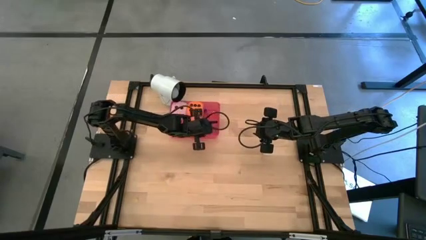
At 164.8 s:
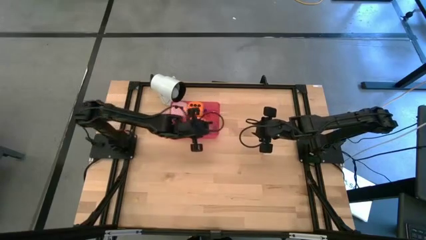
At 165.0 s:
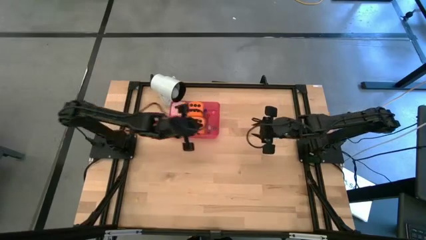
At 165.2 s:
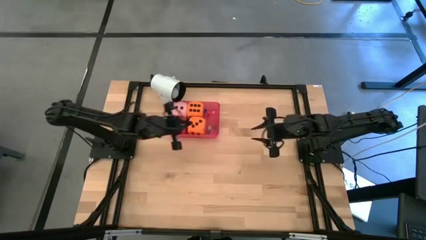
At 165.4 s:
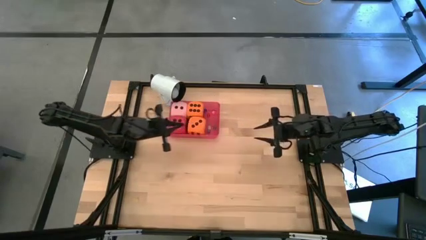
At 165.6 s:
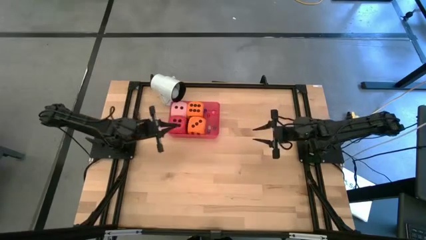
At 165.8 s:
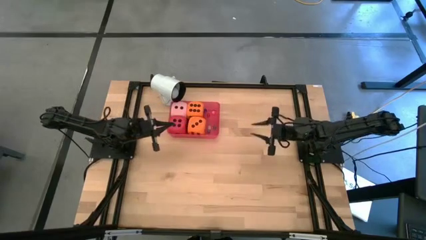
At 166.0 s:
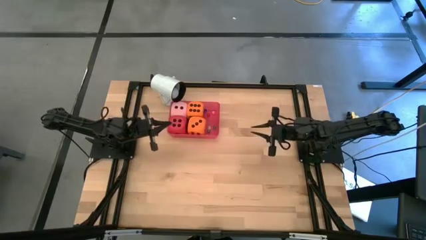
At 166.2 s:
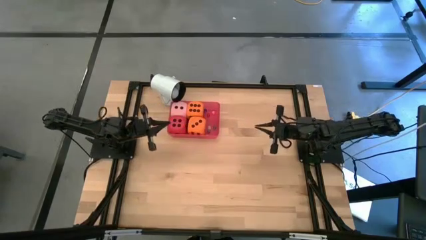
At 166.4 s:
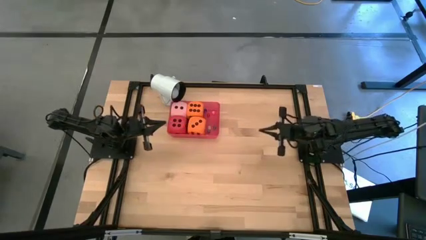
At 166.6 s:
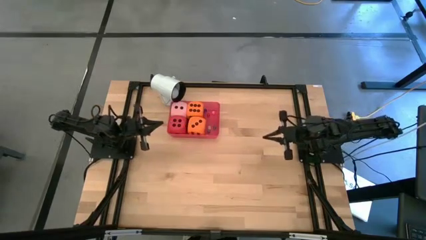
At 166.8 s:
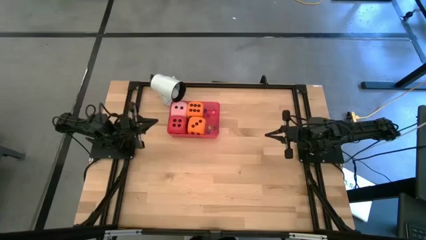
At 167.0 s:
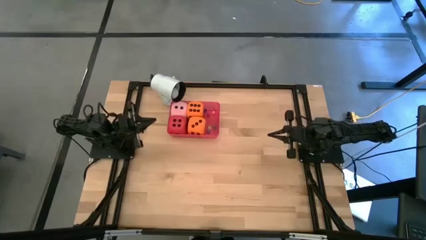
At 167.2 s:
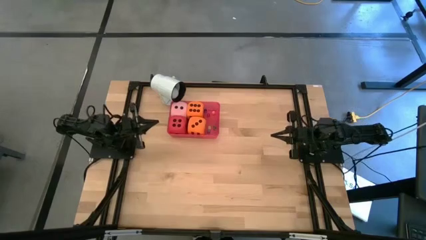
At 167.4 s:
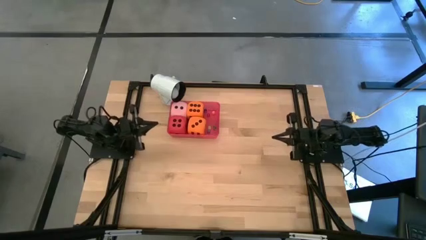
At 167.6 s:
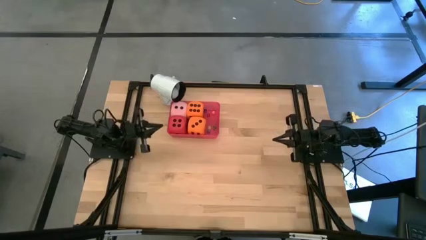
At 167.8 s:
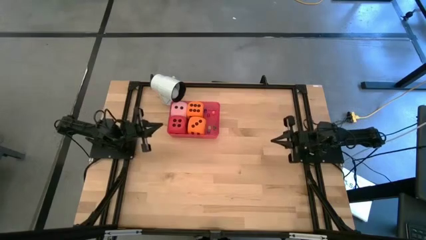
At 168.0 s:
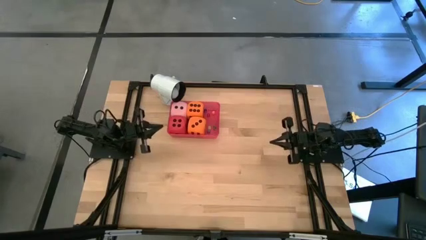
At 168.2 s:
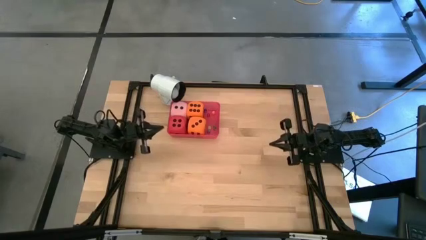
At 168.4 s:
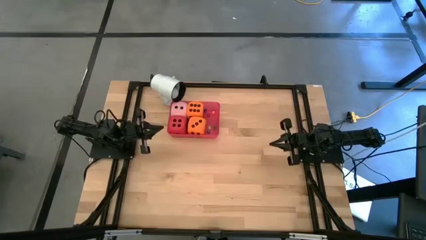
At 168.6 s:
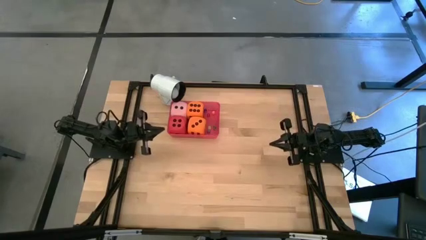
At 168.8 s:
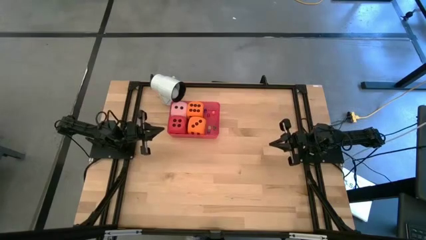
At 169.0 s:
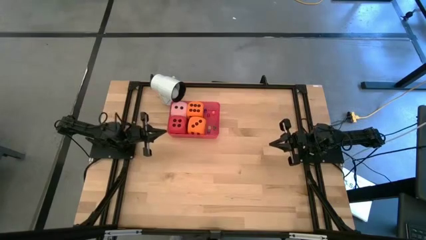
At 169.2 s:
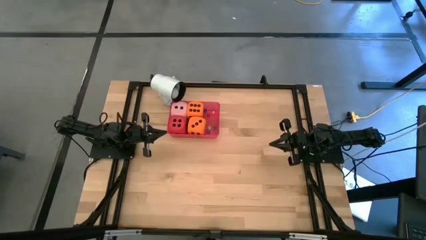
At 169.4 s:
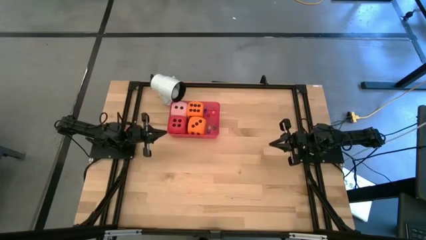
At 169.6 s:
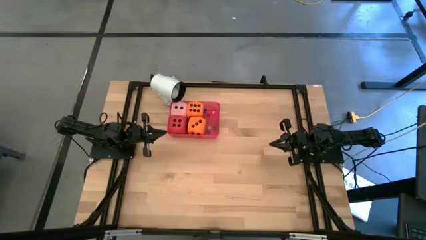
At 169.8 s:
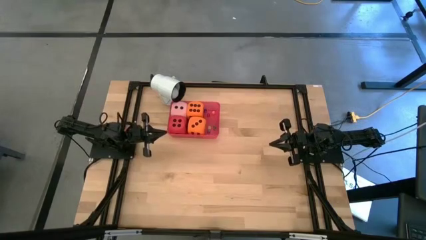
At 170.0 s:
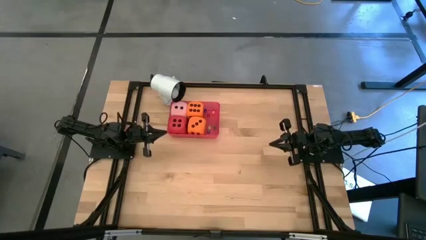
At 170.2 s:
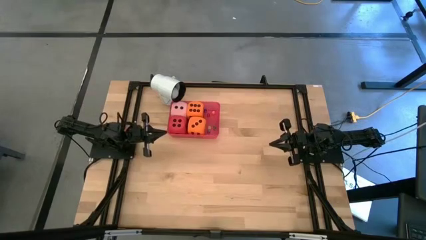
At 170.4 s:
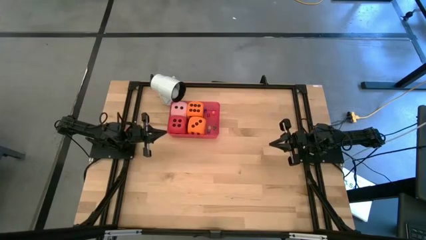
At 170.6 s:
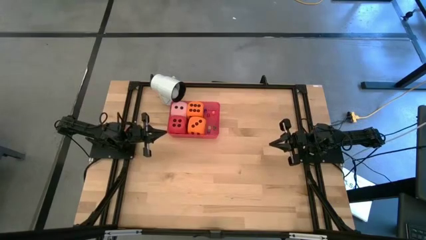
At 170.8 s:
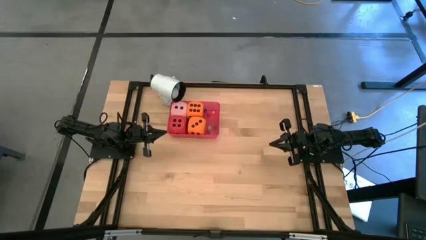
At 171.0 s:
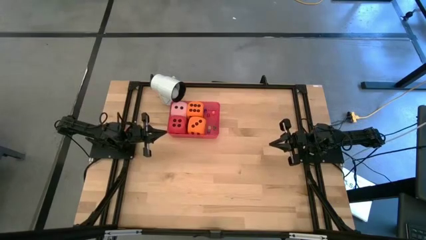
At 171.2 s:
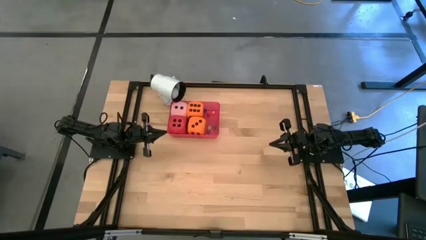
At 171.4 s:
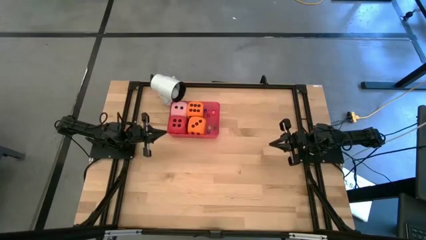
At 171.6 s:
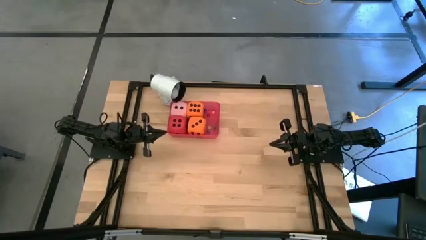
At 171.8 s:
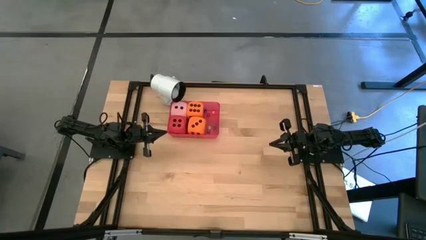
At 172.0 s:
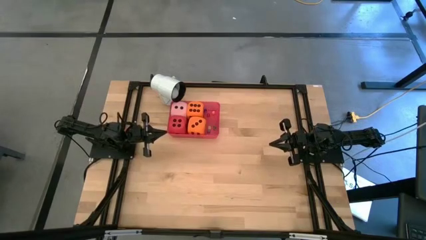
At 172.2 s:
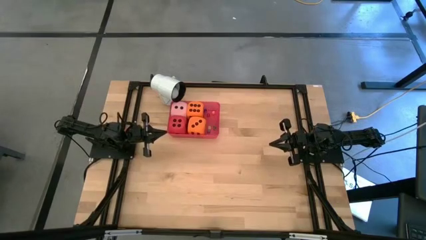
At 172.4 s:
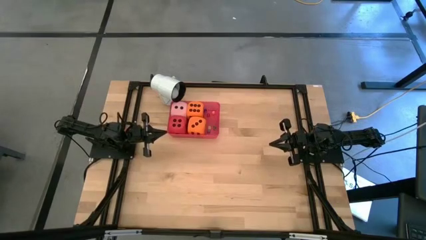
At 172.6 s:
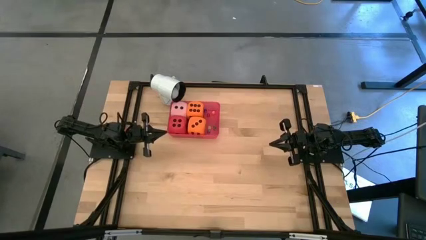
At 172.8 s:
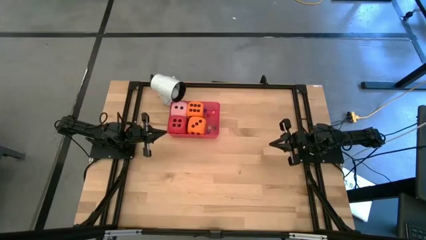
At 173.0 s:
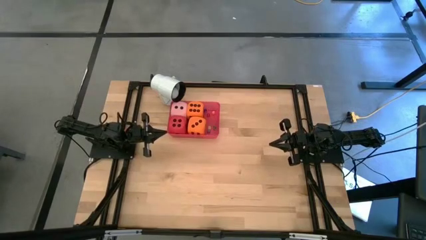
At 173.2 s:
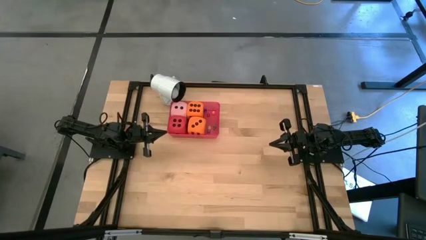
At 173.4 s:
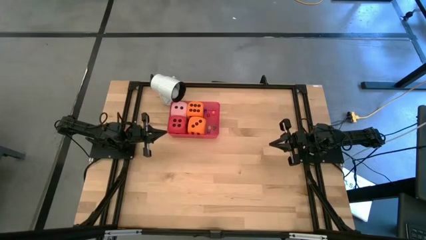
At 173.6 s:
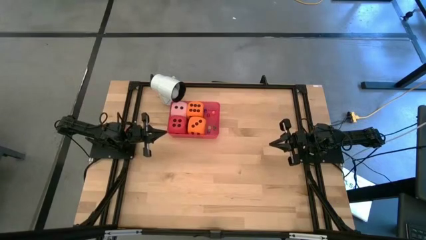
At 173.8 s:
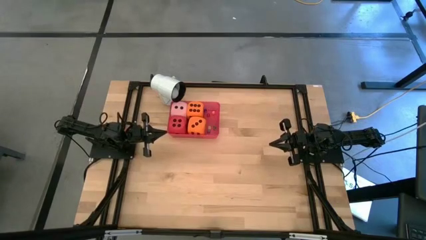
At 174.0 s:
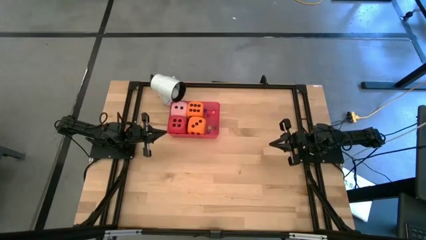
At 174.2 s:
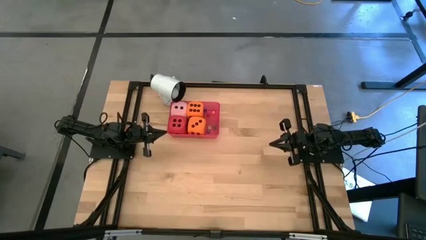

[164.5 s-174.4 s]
Task: Pick & Place Dice
Return to Home Position

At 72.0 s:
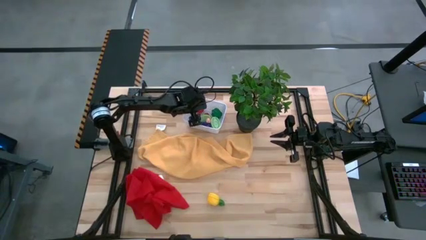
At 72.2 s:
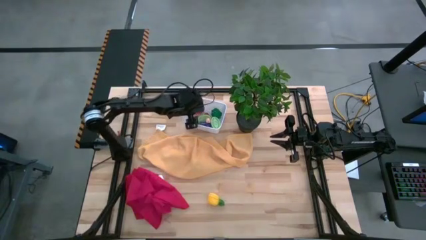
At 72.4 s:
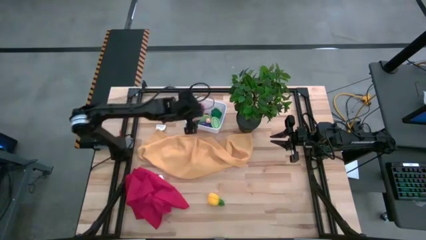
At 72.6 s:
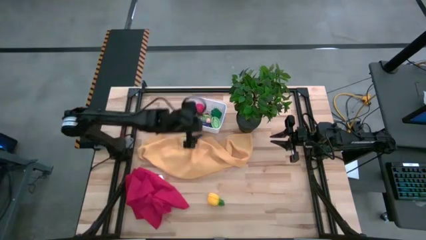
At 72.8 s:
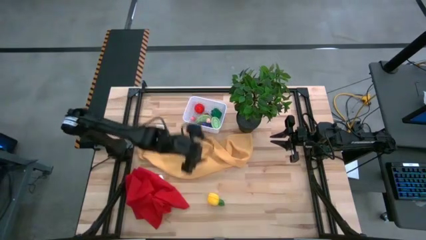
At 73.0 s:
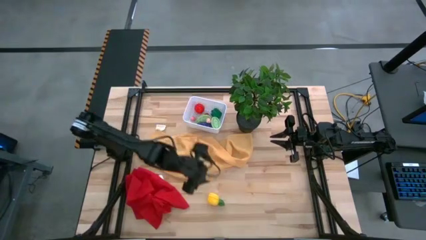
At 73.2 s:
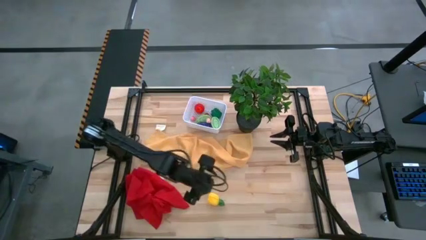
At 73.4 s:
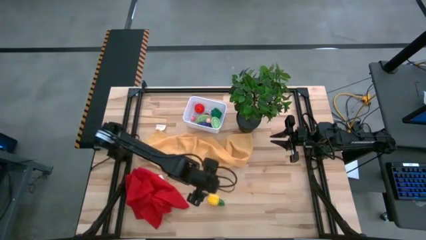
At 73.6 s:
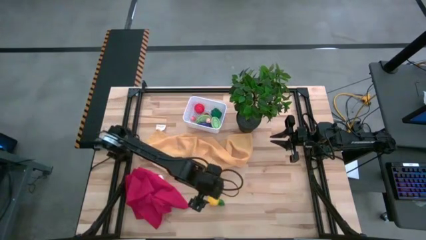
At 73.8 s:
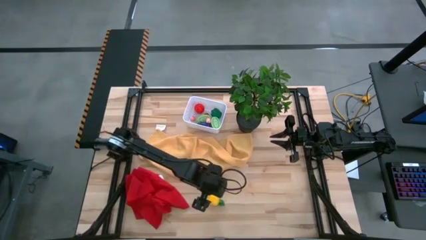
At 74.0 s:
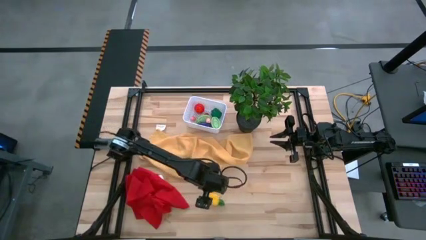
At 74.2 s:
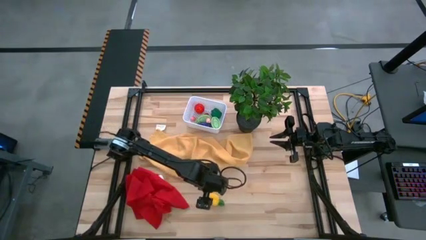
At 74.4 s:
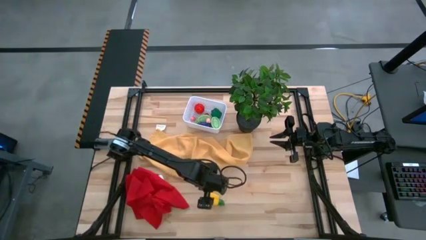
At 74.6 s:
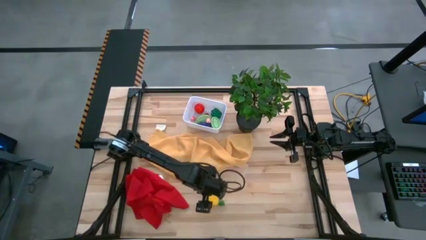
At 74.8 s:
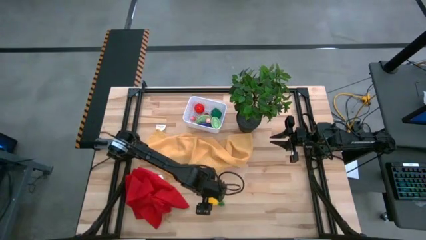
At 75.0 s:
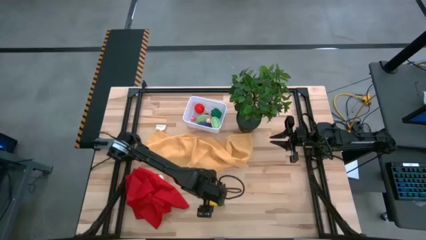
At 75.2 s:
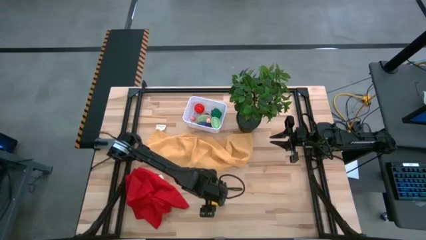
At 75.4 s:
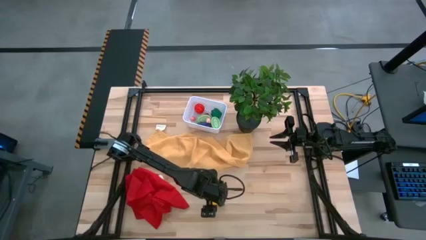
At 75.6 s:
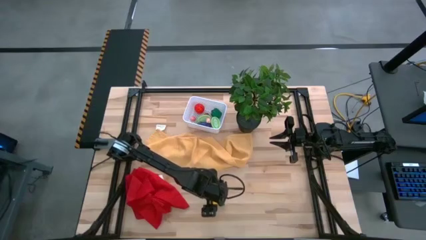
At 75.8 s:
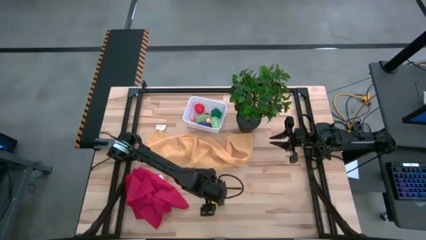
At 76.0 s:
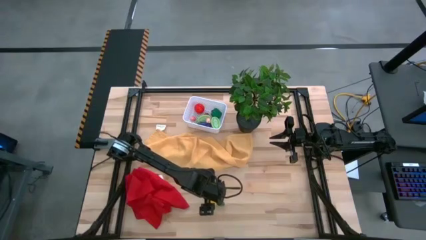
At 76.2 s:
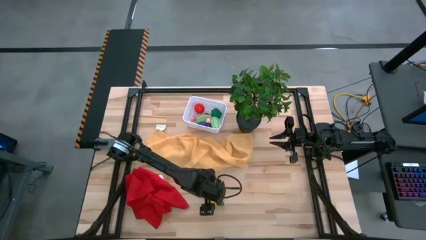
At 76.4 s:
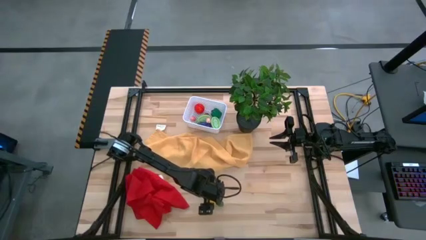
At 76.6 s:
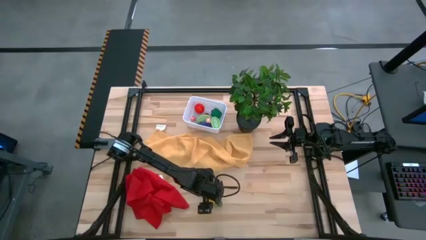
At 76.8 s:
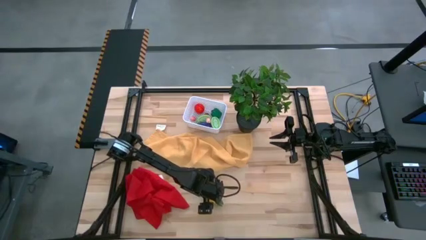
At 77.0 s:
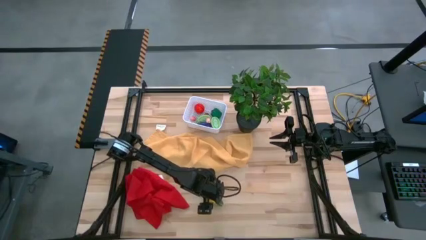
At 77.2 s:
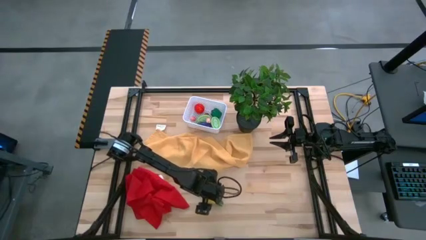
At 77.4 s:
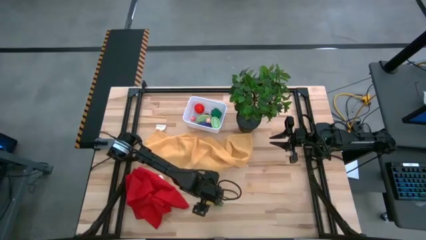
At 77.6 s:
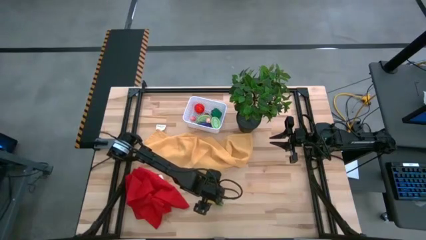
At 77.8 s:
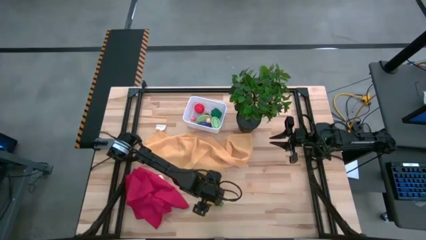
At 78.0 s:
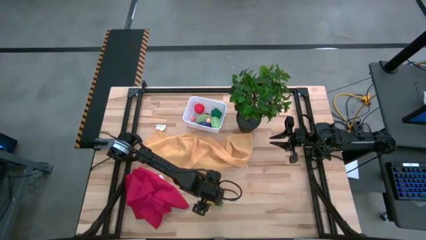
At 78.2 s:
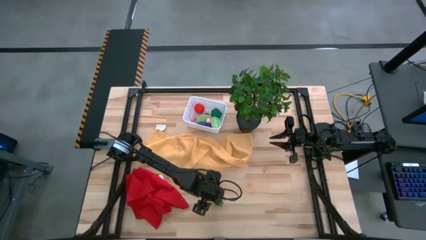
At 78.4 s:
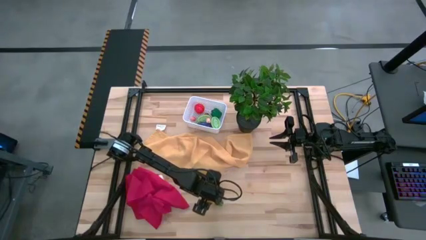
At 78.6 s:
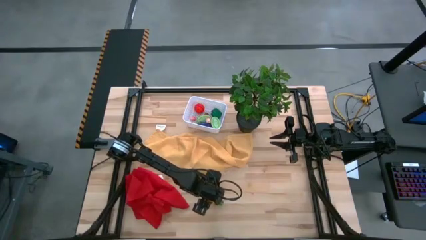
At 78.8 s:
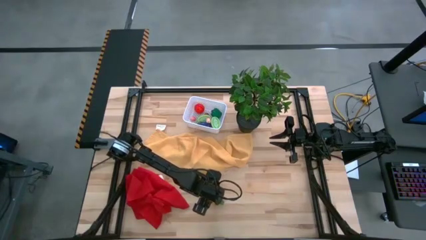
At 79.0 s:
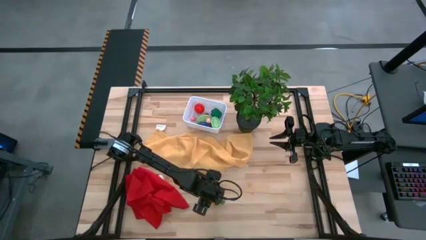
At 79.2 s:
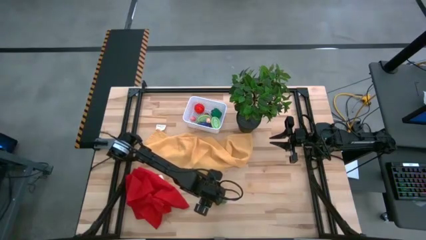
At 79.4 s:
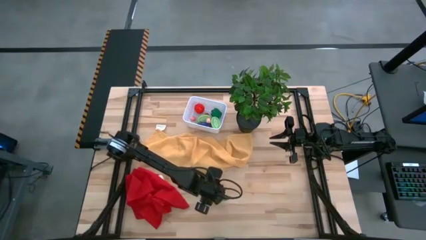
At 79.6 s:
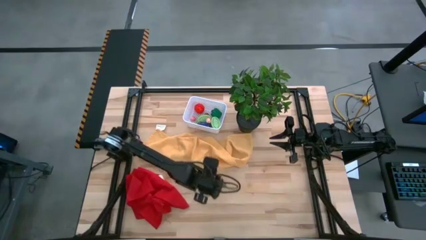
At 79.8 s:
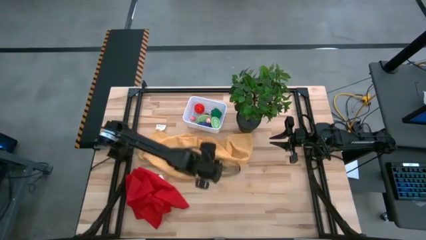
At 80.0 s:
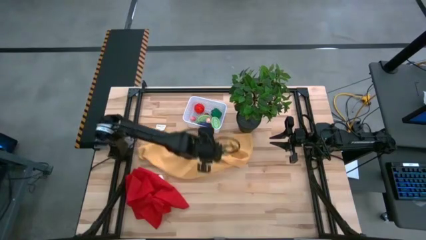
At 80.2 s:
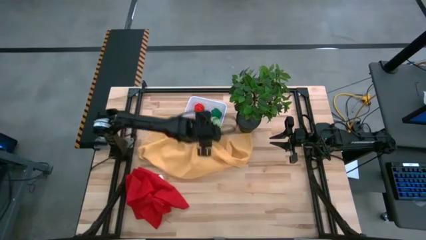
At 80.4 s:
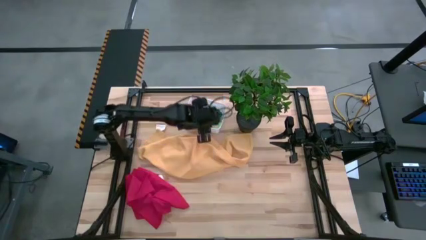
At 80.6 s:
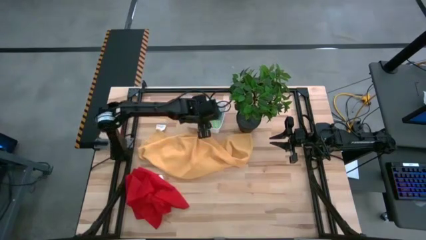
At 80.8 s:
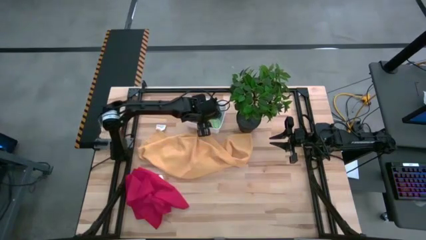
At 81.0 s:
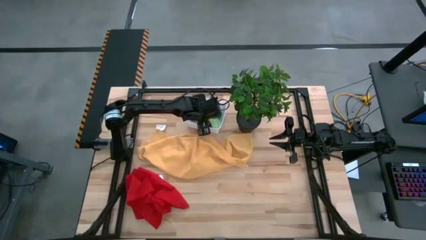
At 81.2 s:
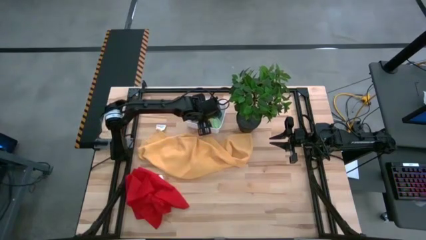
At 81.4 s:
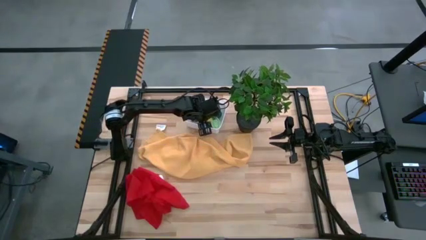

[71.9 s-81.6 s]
Task: Pick and placing Produce into tupperware
Put the yellow pineapple into the white bin
